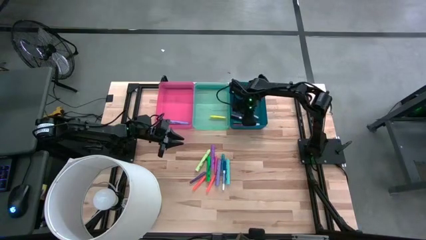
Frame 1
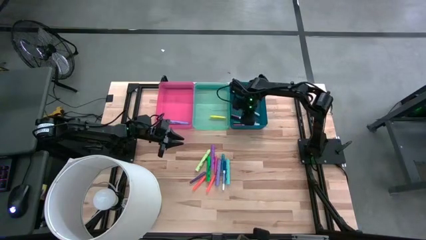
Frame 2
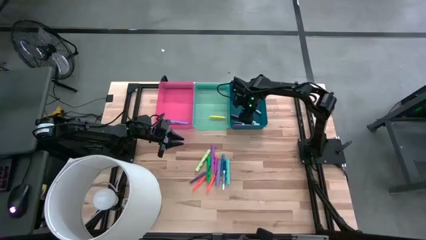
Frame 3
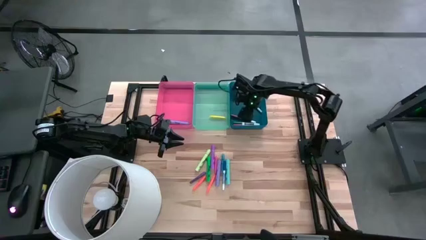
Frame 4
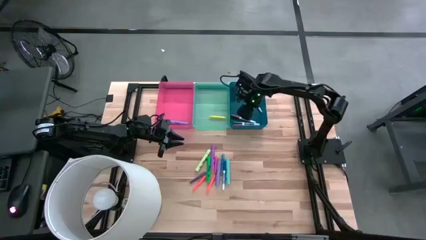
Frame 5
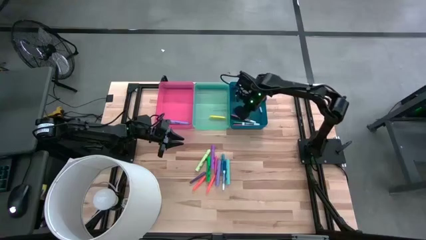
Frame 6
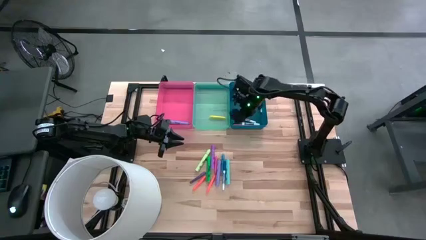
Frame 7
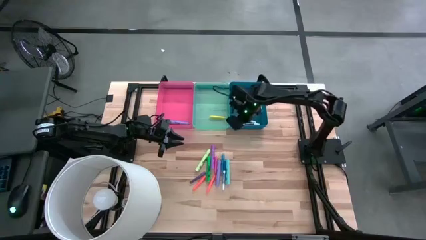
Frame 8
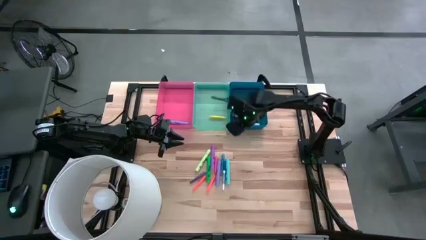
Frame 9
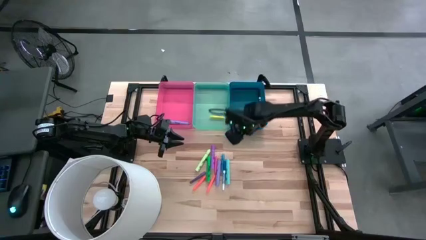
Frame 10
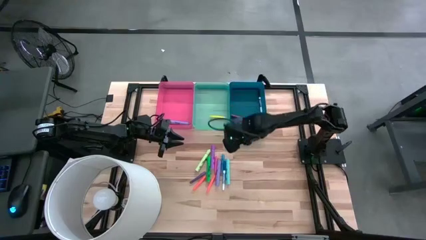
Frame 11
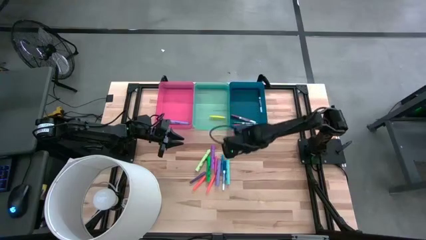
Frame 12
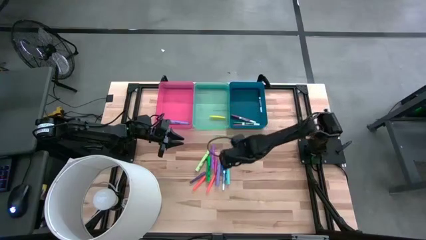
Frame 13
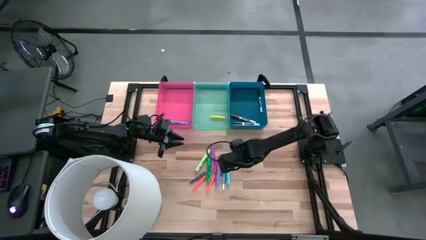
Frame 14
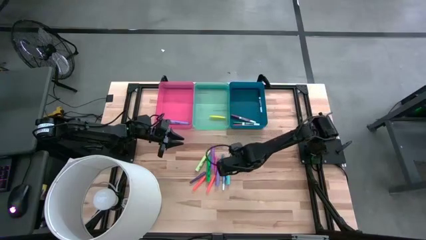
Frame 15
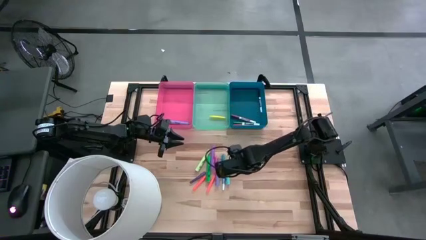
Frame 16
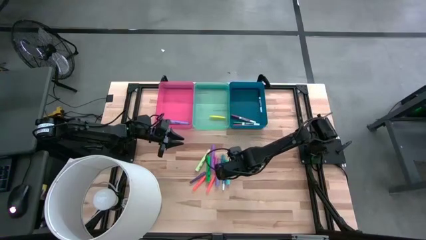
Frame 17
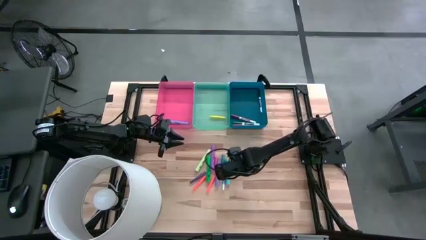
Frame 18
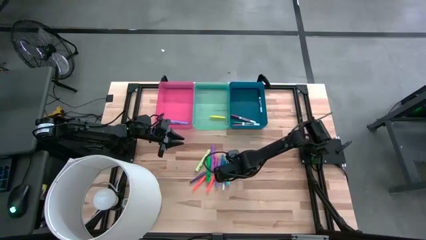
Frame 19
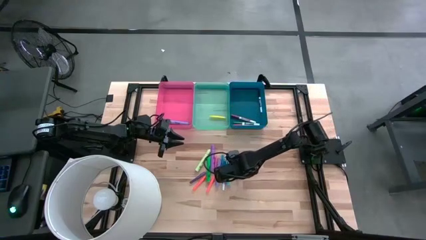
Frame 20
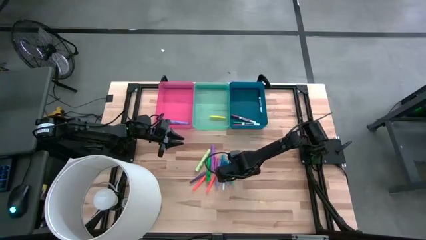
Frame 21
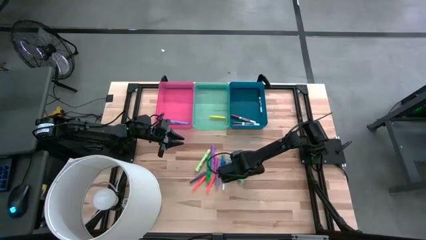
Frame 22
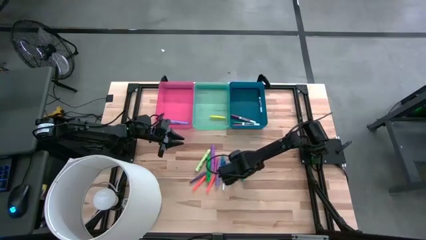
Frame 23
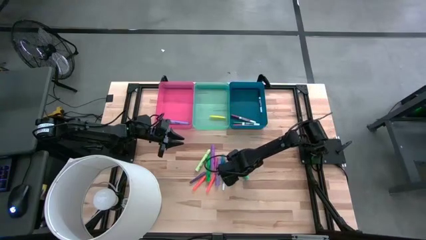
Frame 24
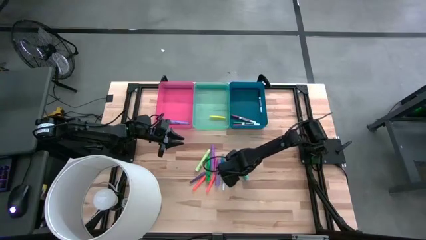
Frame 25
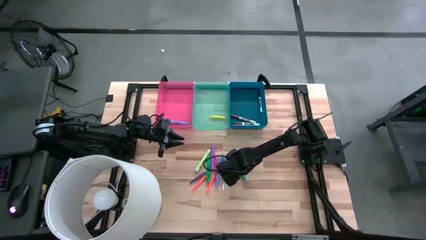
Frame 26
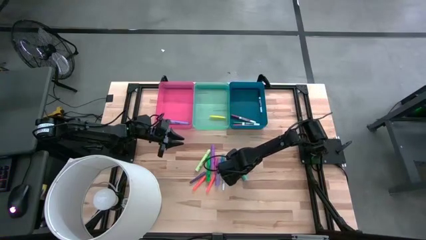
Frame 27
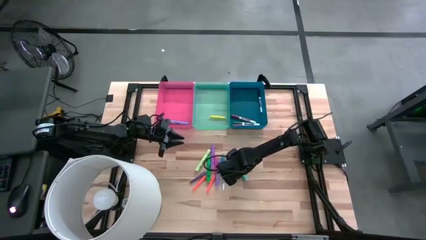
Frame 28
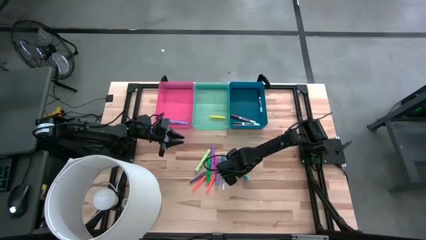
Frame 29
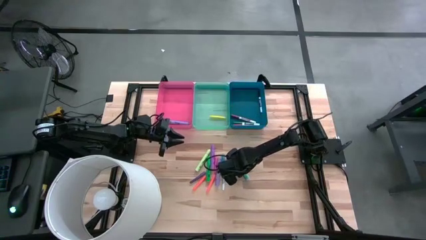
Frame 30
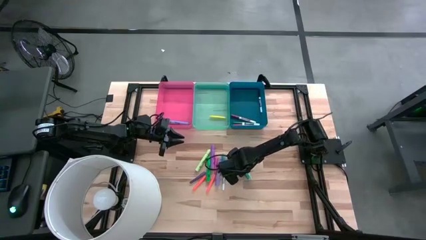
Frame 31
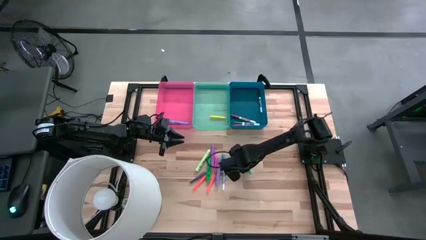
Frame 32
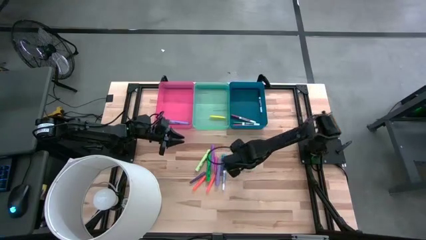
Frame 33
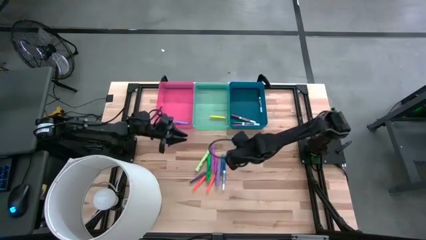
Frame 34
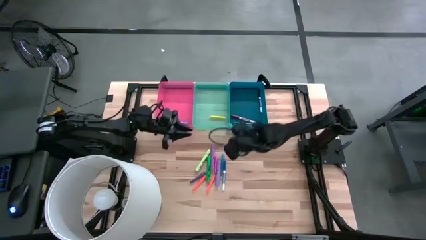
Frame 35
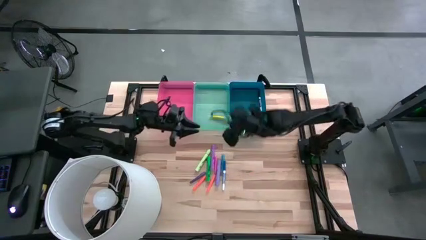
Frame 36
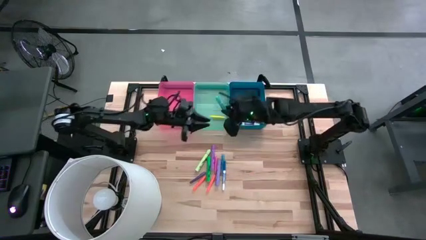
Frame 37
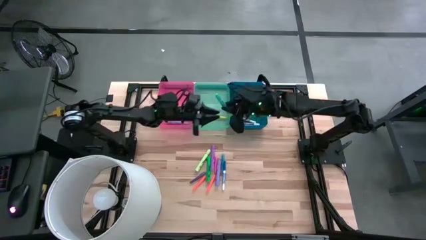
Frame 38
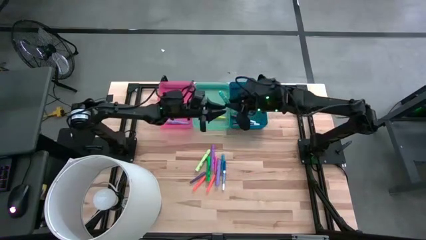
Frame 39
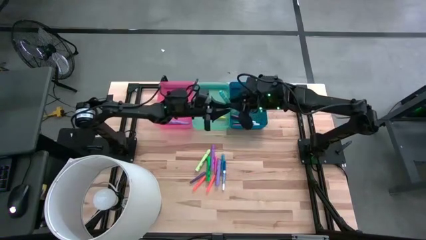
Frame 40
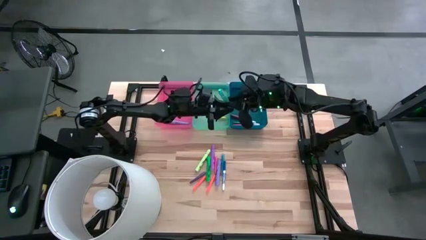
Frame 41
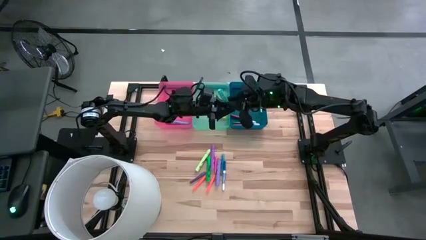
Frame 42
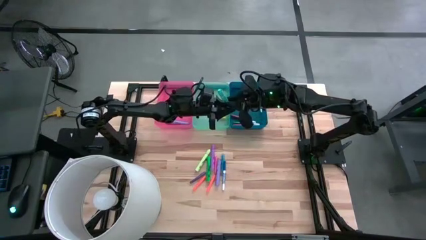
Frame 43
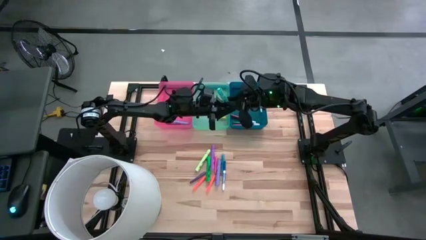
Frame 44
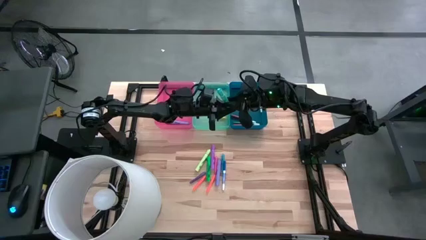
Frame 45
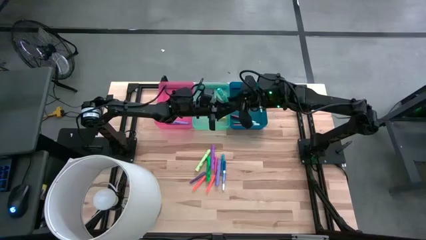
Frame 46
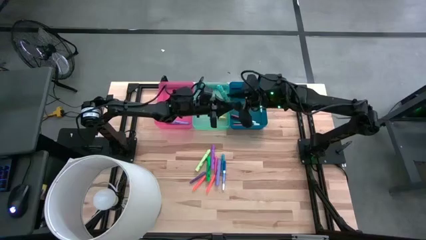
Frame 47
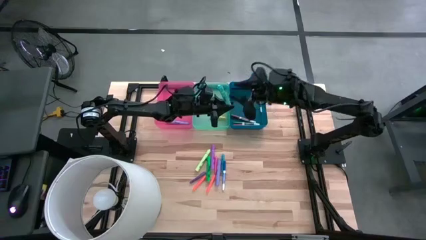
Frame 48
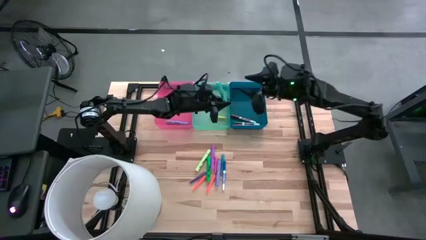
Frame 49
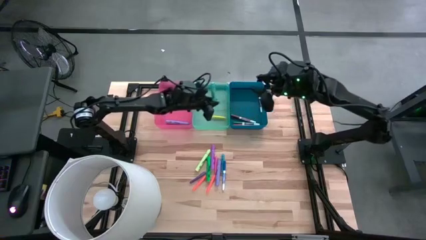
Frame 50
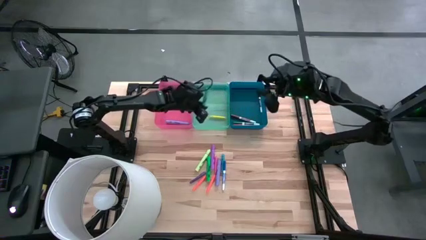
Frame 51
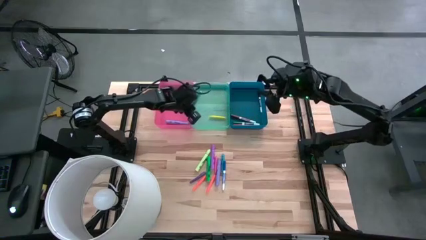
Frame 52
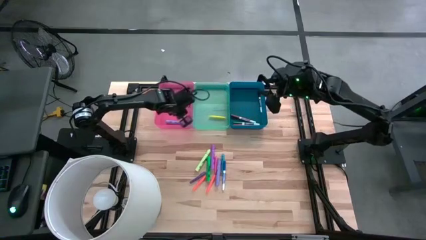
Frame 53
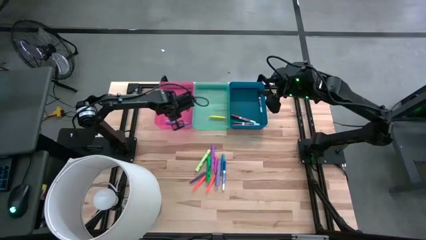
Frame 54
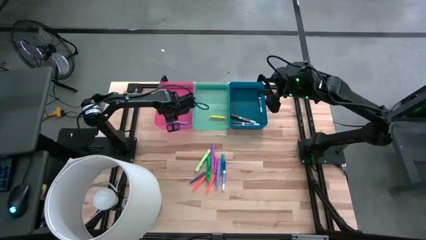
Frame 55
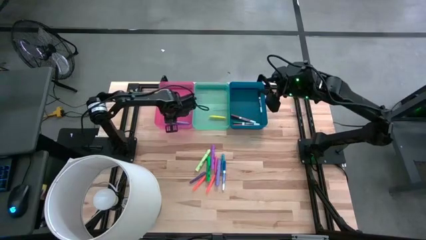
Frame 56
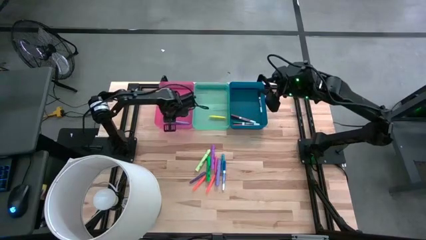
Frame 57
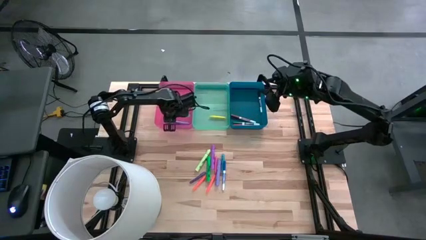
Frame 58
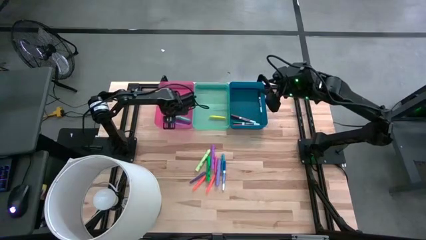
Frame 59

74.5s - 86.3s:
Task: Pick & Place Markers
Put the light blue marker into the red bin

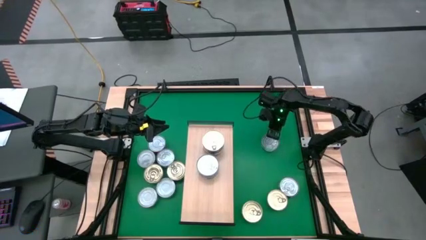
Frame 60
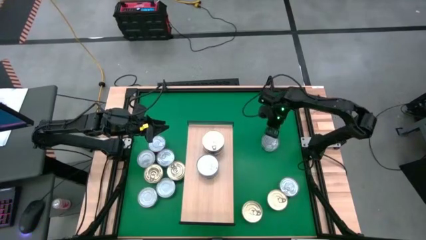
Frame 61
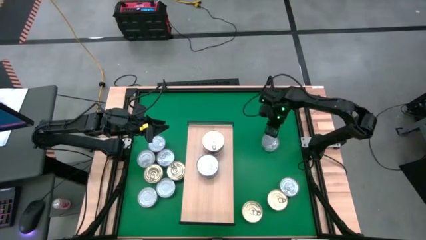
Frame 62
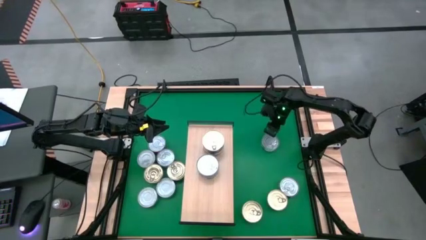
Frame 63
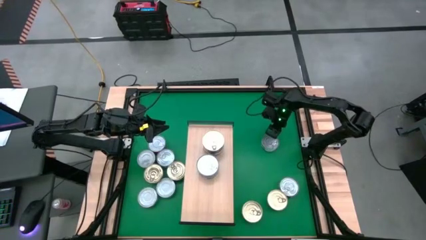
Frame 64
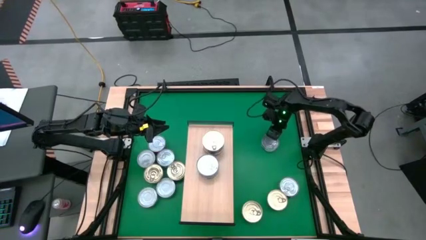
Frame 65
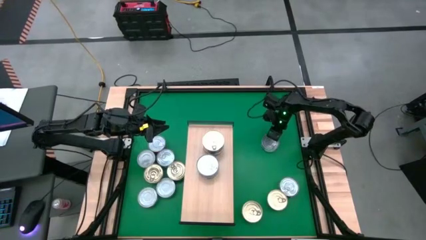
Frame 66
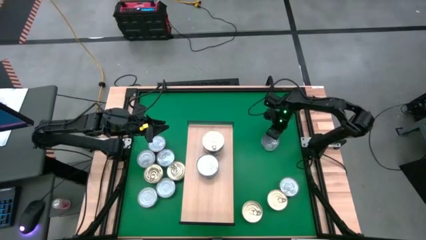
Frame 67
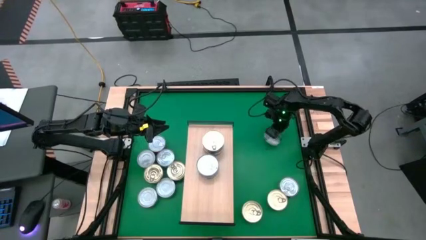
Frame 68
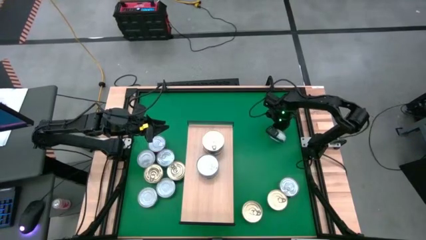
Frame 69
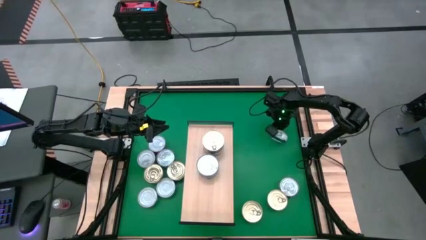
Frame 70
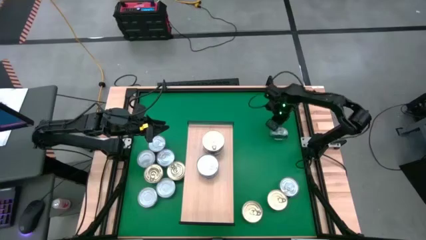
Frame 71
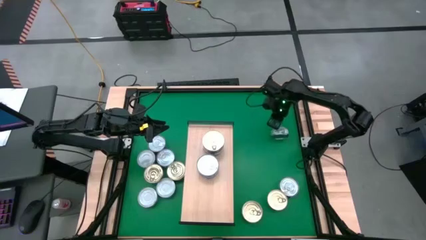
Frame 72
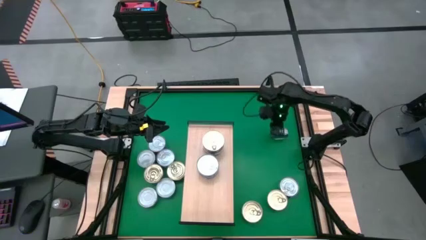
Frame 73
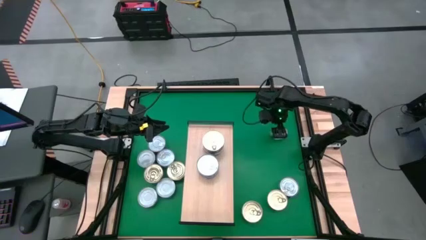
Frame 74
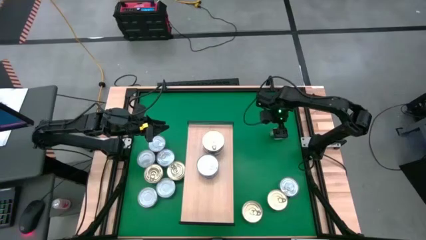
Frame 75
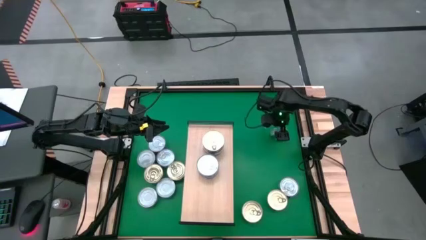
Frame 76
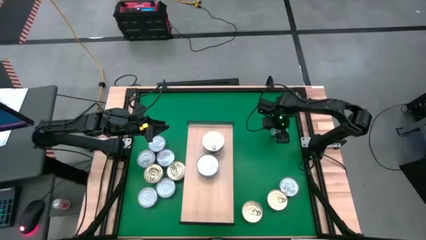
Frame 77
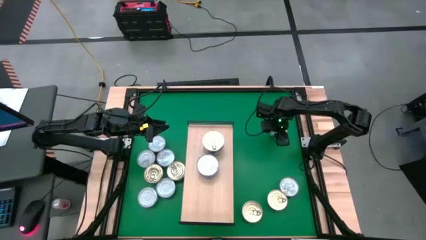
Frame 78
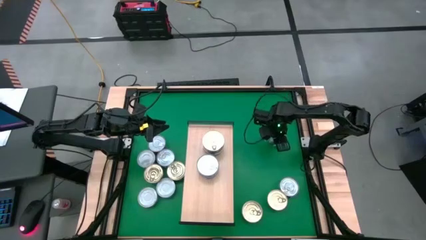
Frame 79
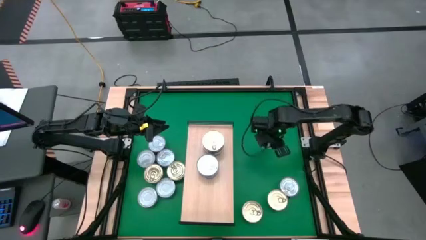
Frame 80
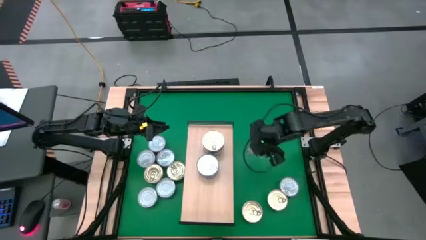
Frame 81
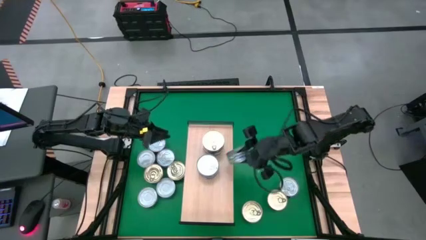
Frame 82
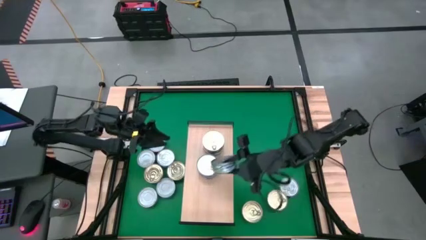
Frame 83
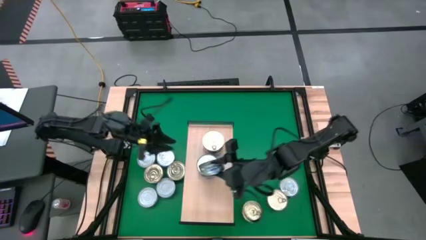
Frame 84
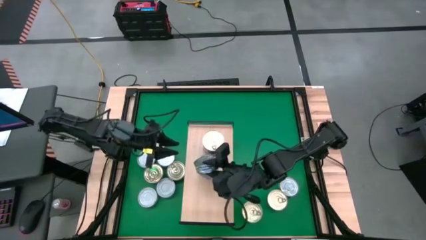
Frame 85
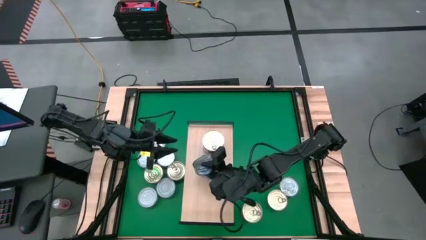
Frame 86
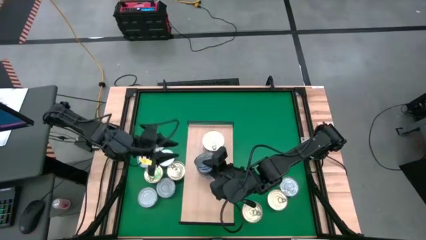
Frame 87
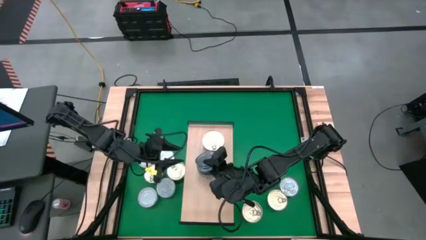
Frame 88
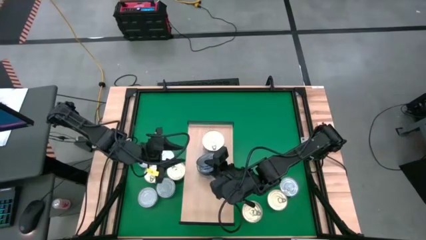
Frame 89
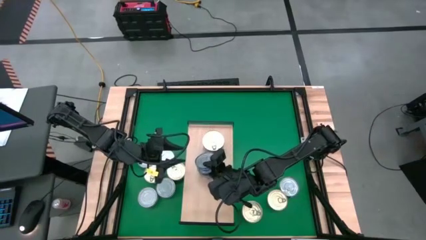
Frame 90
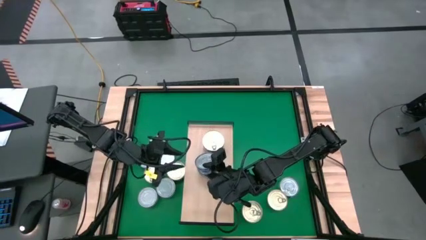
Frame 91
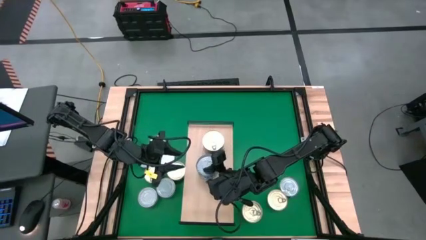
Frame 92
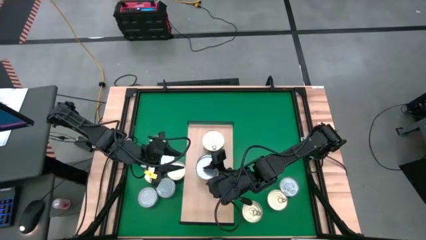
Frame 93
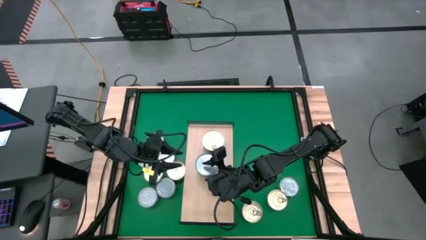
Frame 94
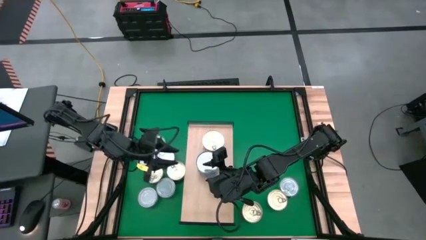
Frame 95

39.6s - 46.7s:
Task: Stack canned seafood by type on shelf
Stack the green tuna can on top of the blue tuna cans on the shelf
